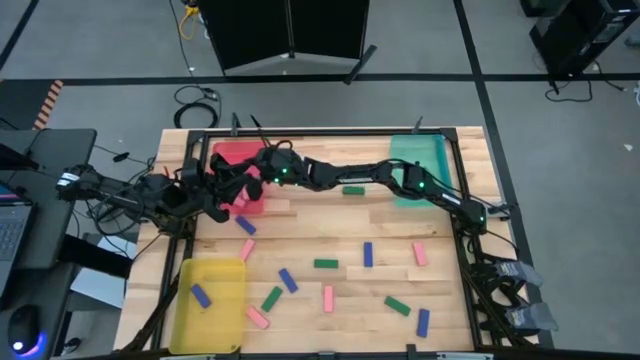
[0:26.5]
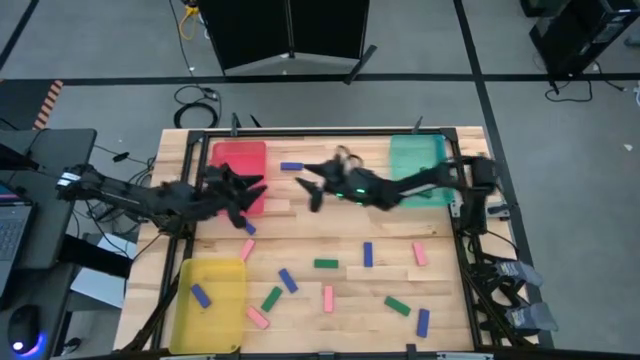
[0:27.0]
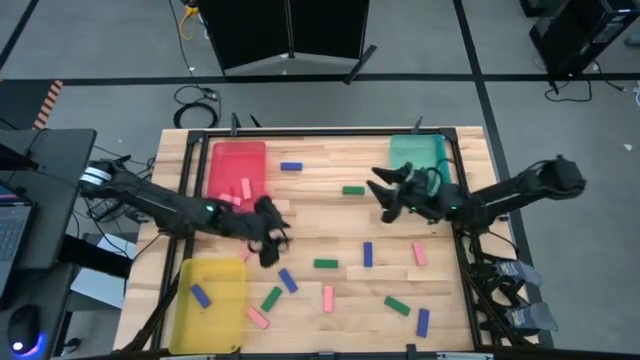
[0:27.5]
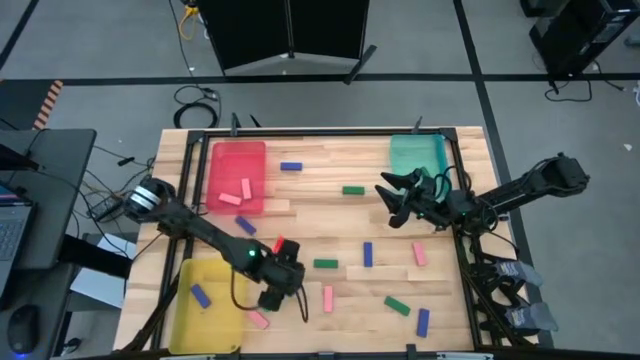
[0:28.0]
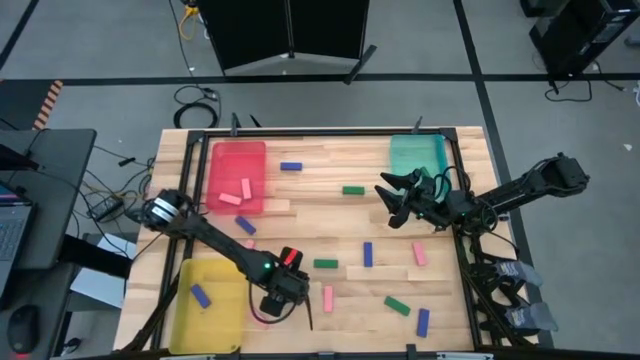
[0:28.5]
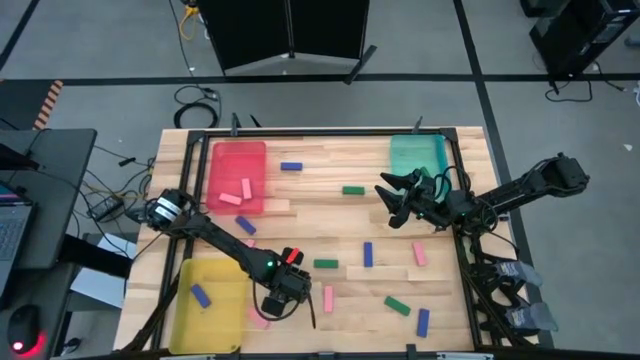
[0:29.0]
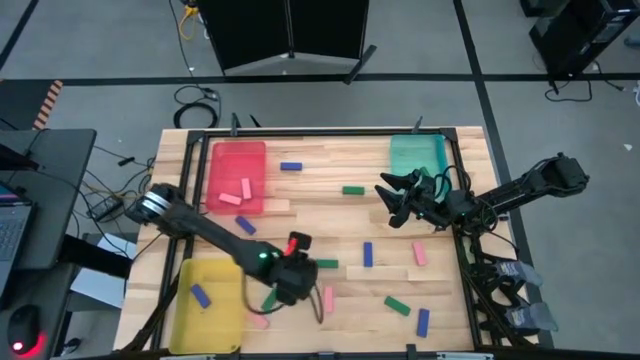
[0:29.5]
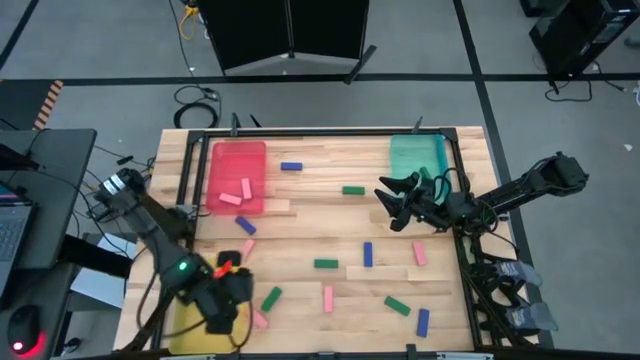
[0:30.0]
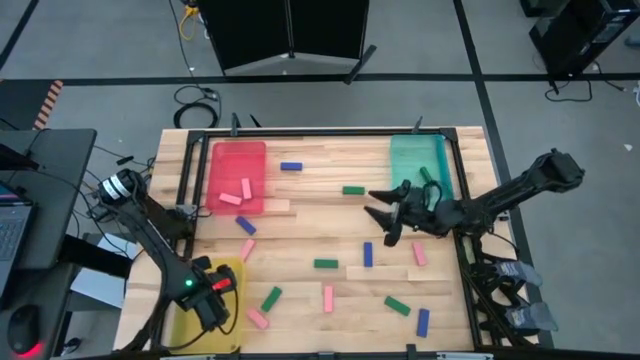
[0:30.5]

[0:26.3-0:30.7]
Task: Sort blocks
Put the blue block into the yellow bin

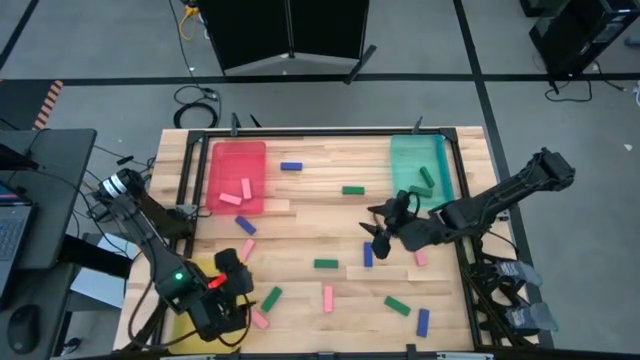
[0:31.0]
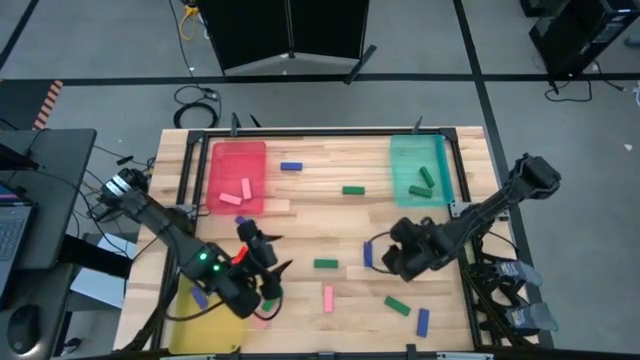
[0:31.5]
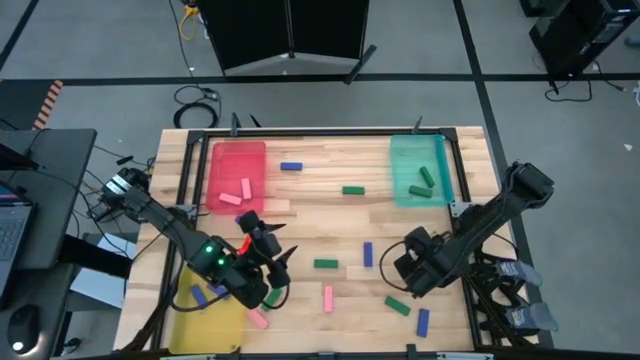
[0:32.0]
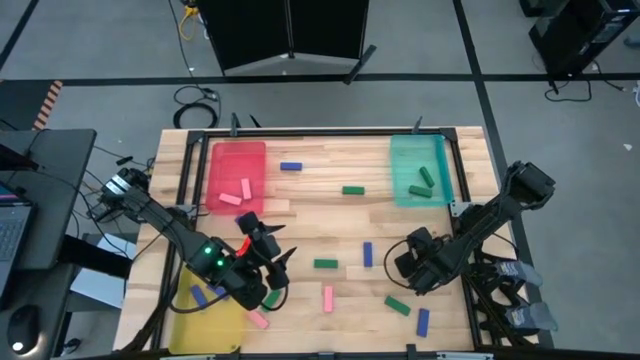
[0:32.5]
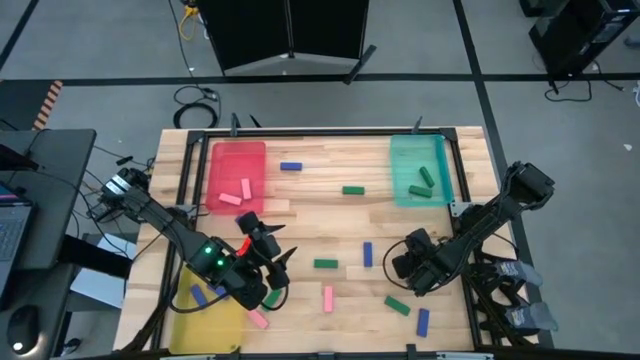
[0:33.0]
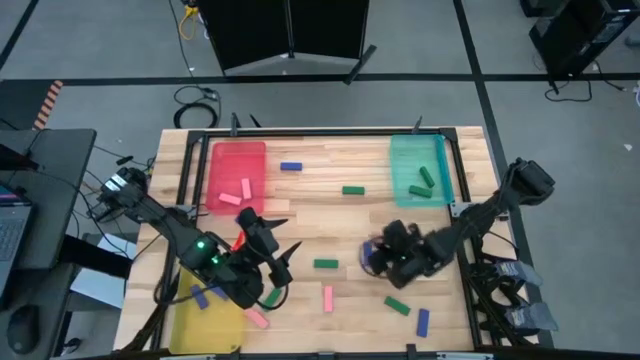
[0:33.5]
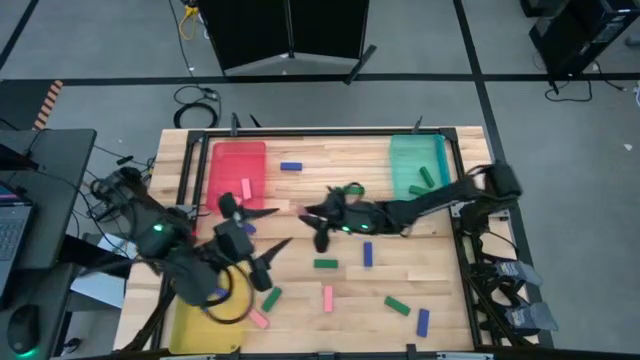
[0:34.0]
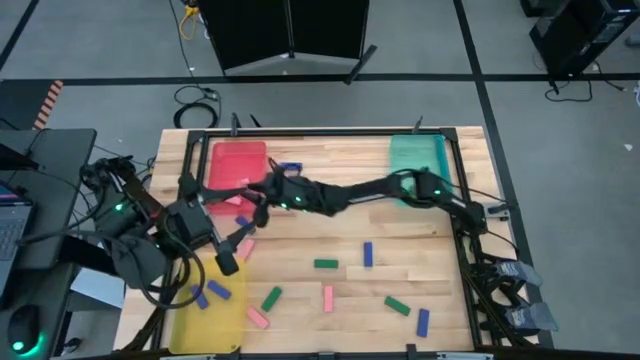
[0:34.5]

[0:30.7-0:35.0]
Put the pink block into the red bin

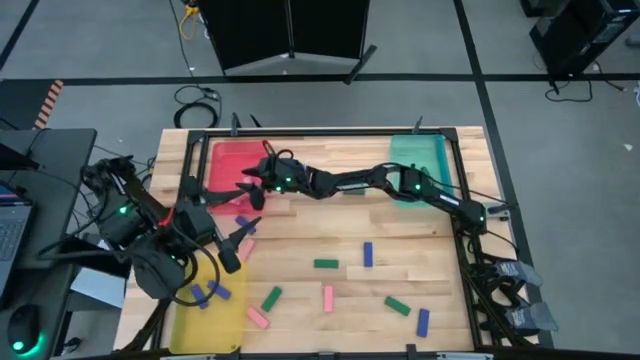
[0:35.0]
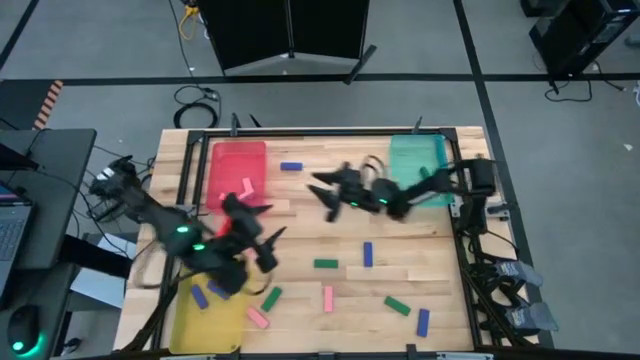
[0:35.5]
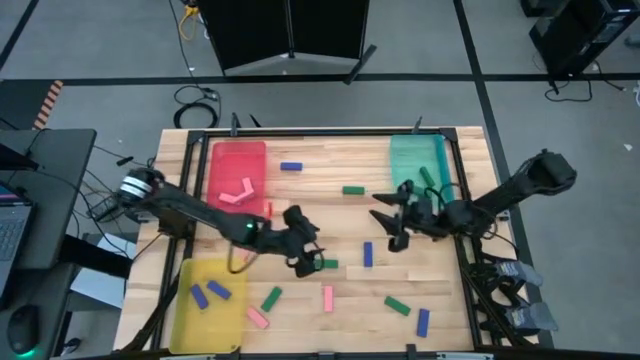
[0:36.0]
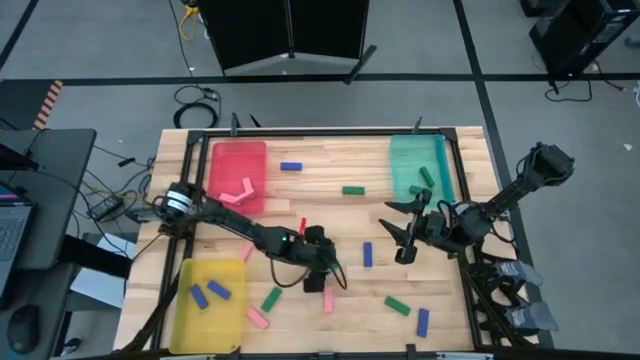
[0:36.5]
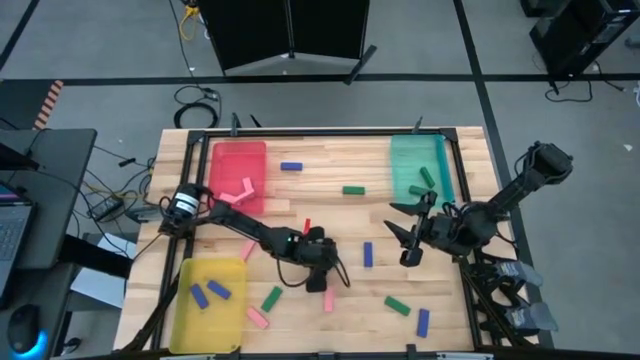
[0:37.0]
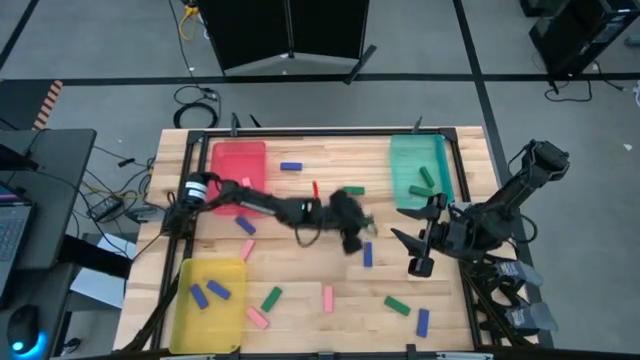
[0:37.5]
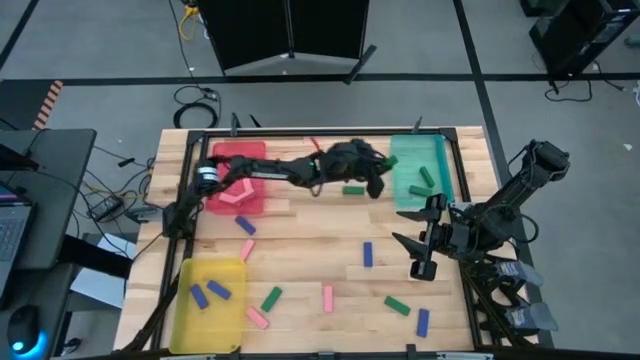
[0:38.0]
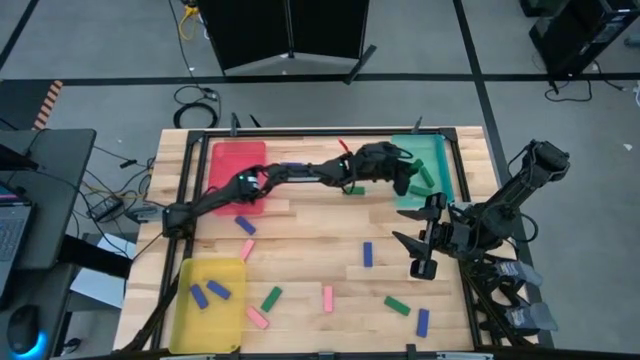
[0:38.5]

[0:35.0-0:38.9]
Put the green block into the blue bin

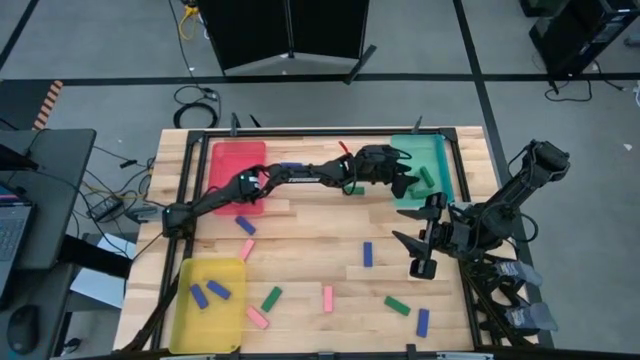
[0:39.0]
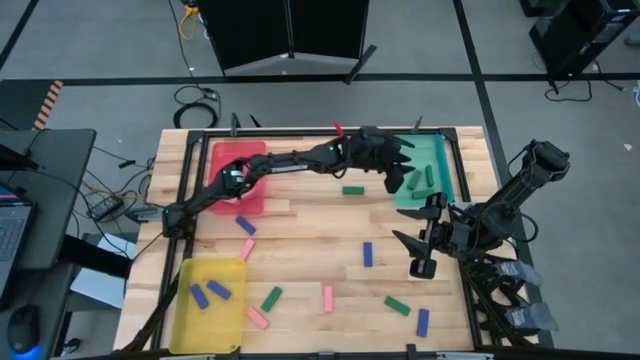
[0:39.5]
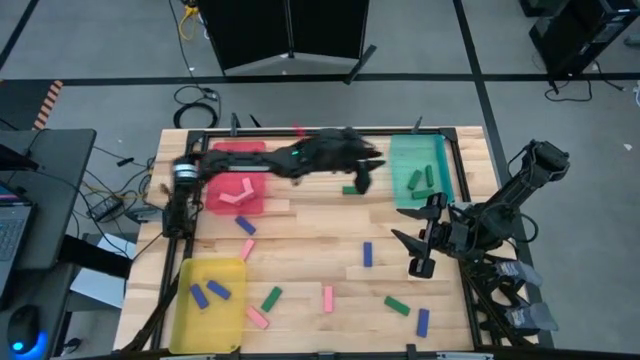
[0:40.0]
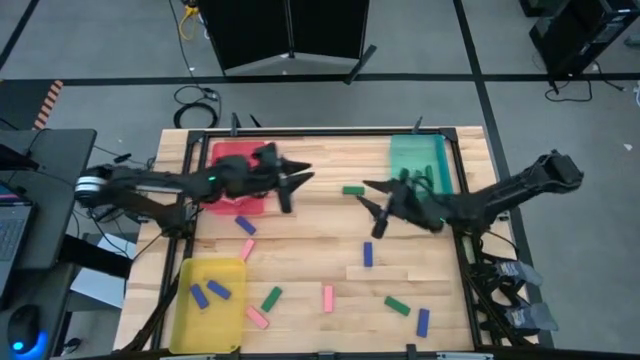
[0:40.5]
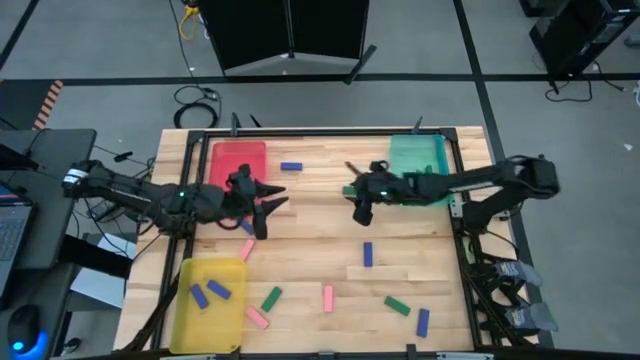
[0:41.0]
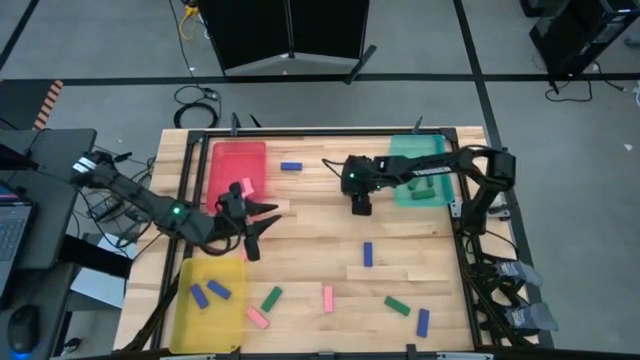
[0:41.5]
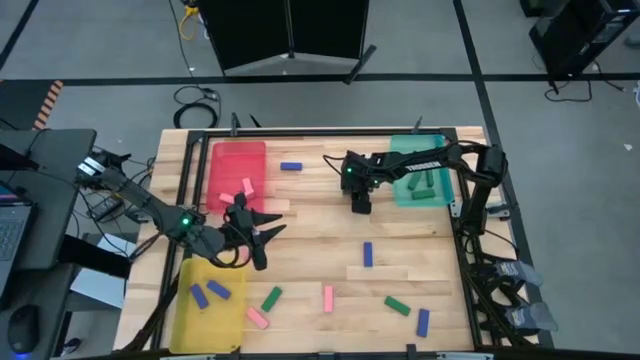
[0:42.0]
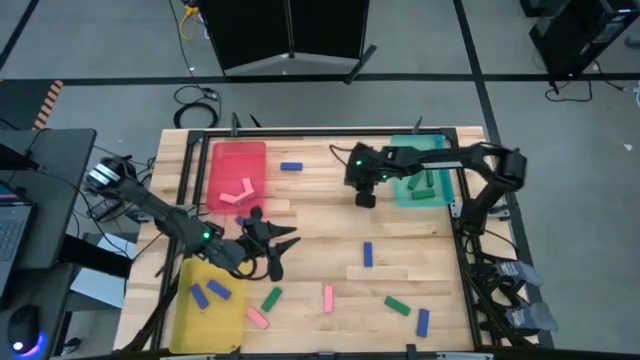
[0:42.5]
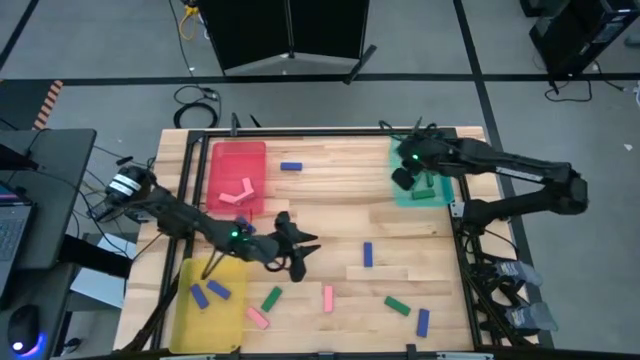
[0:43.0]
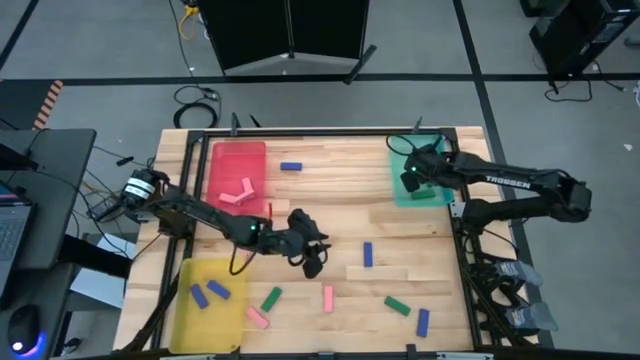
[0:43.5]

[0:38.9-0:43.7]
Put the green block into the blue bin

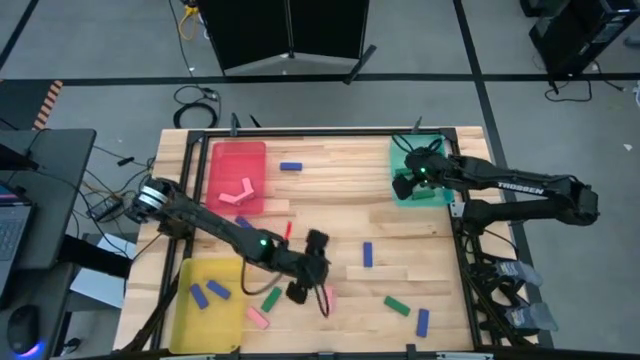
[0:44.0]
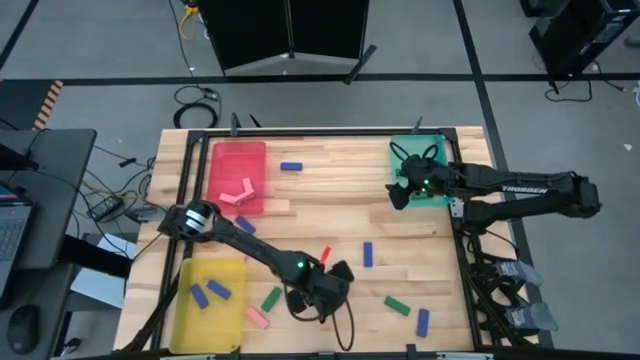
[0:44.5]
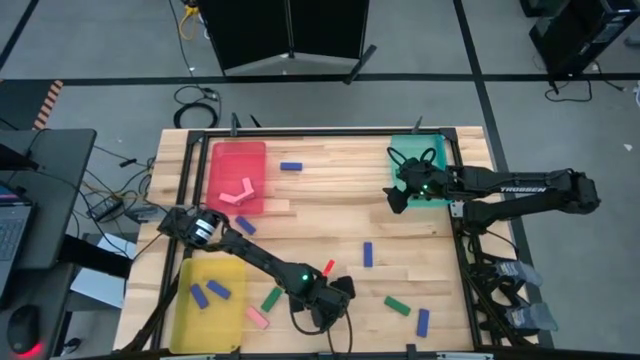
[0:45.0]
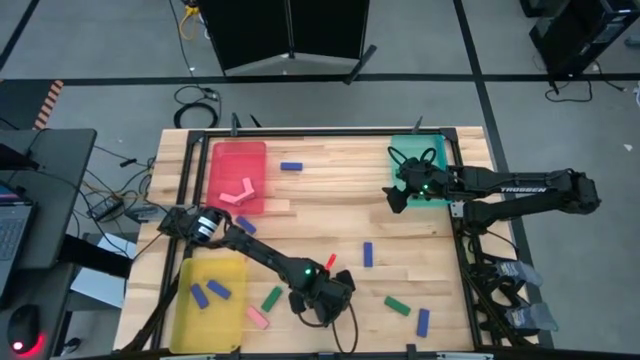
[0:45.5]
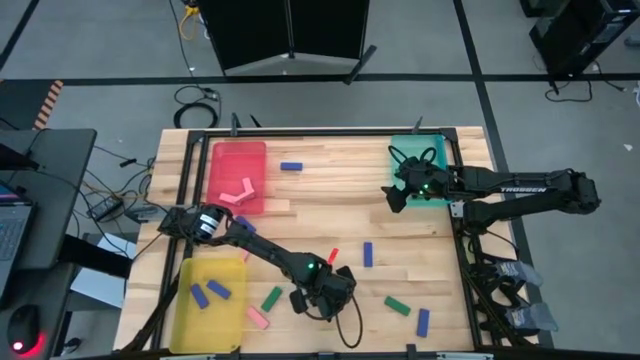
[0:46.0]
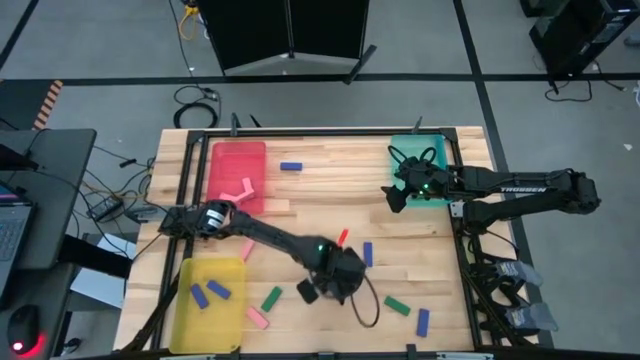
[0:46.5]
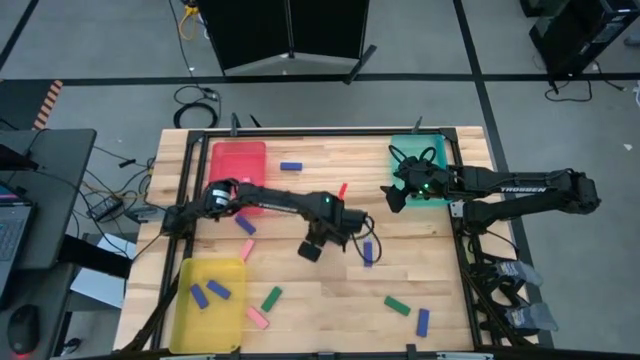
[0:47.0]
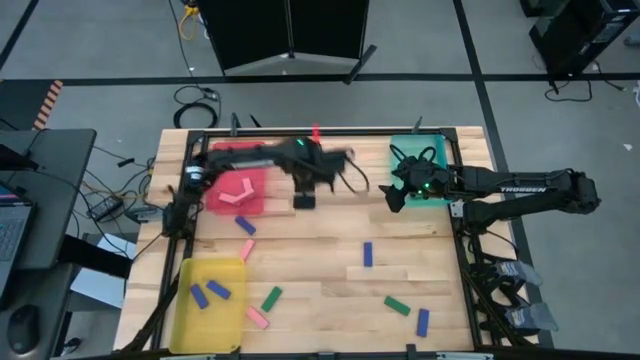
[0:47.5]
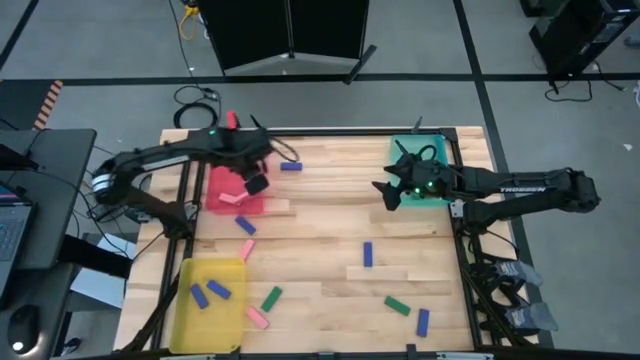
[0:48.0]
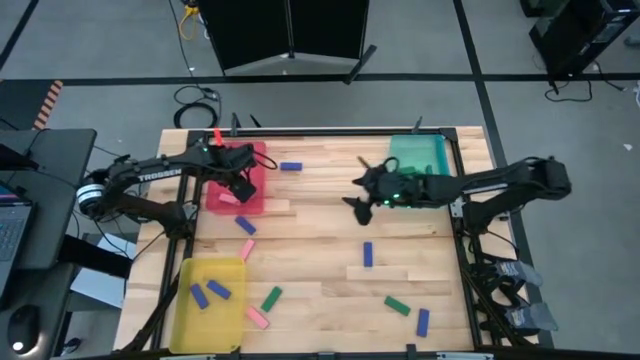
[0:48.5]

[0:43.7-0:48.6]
Put the pink block into the red bin
